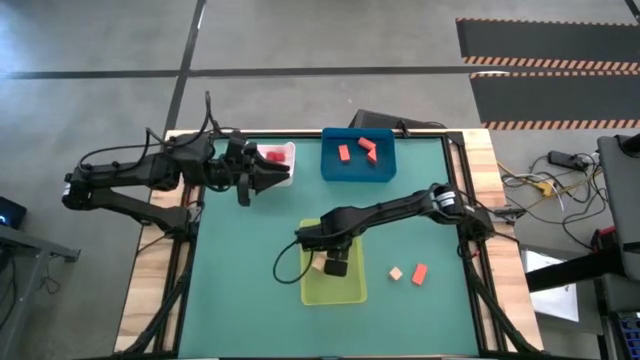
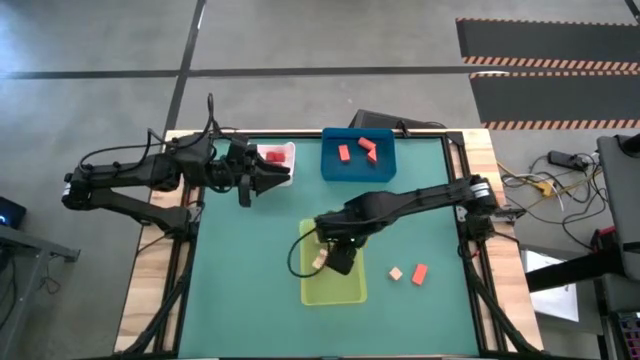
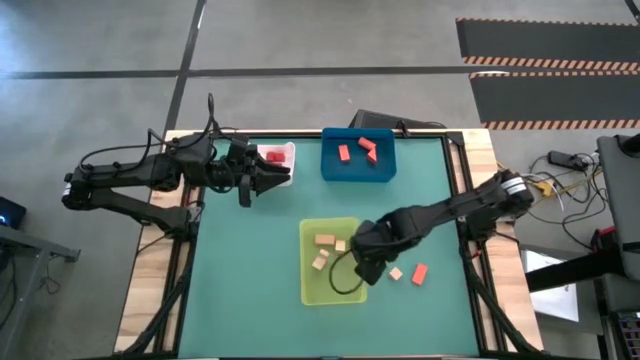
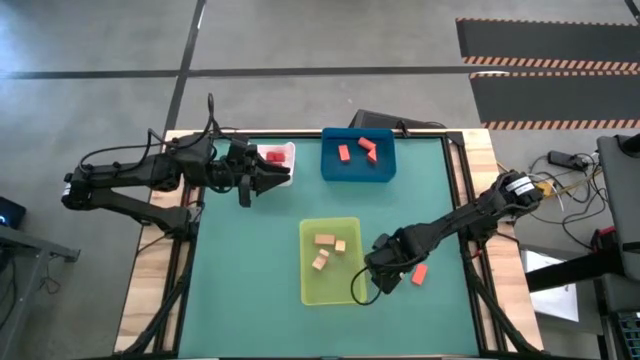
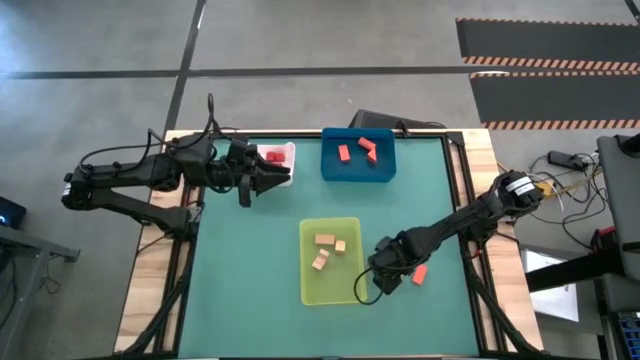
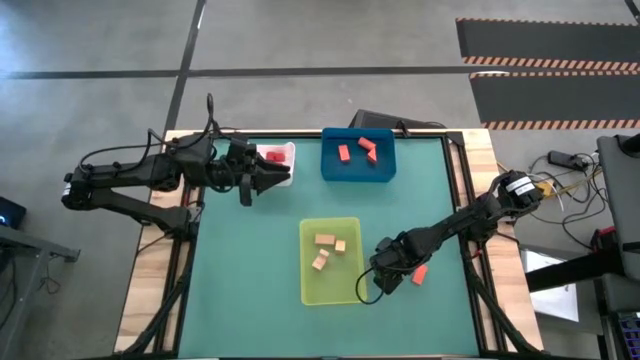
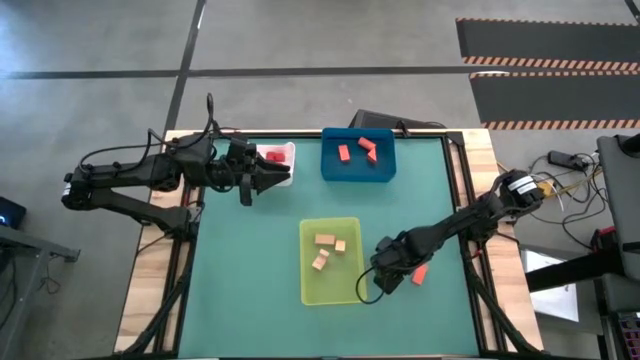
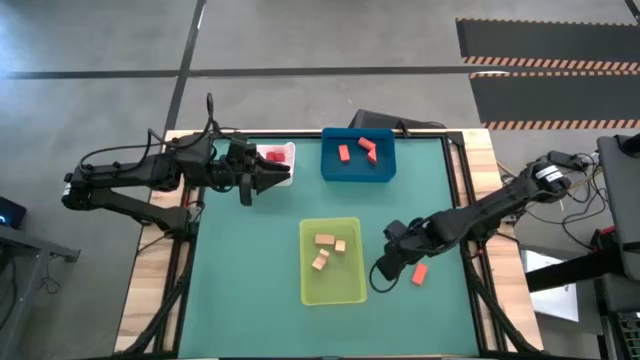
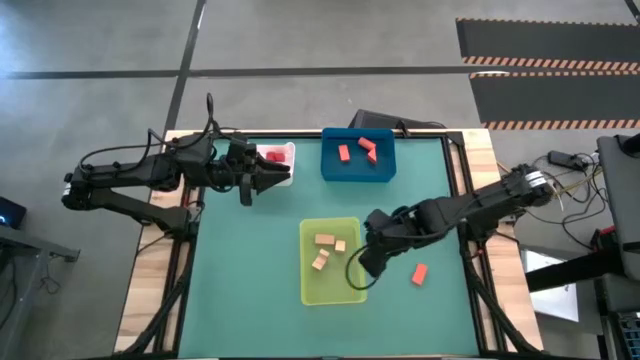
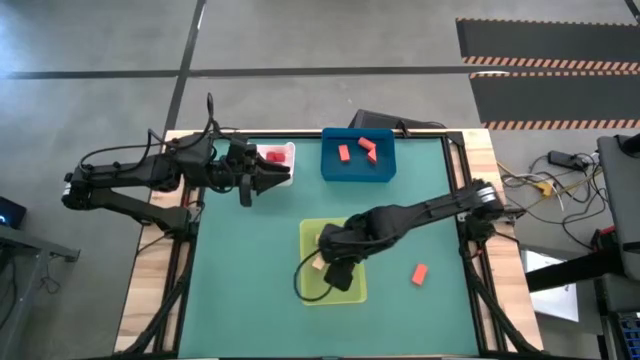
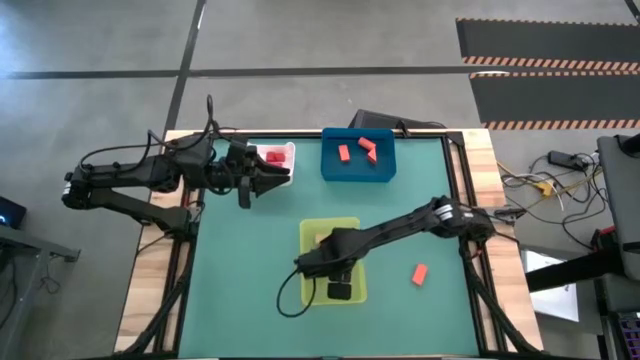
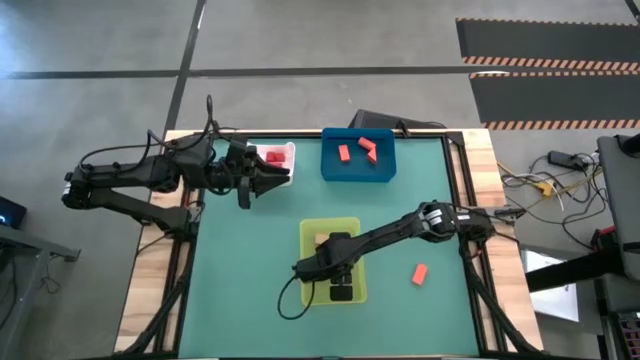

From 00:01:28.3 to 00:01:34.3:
Task: Sort & place blocks by color
Put the light orange cube block into the yellow bin

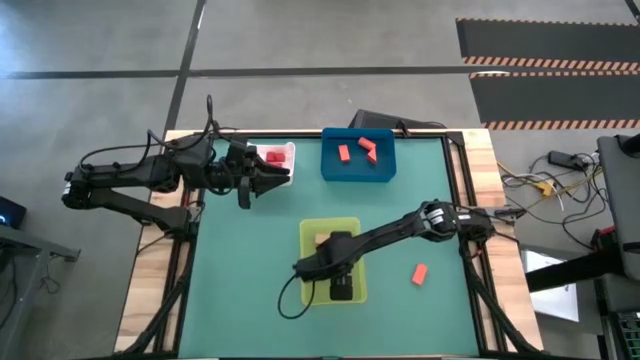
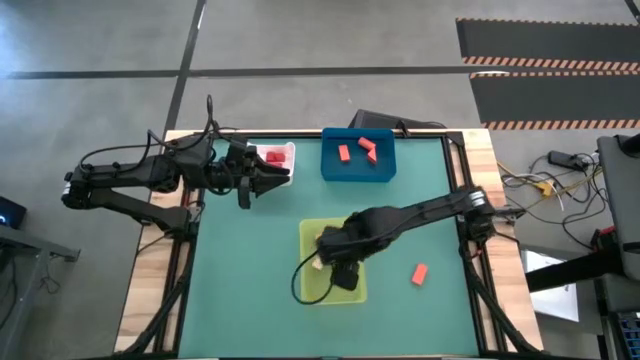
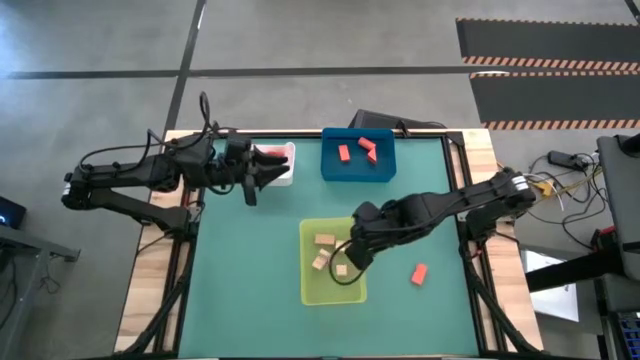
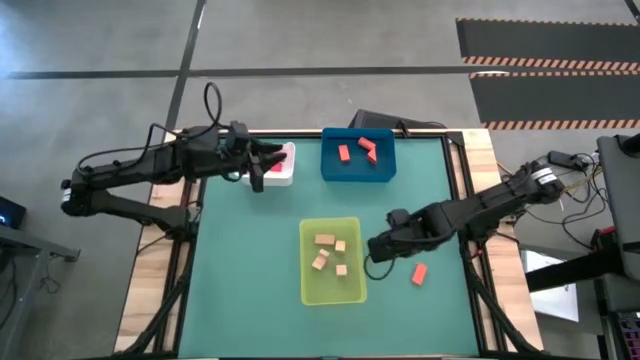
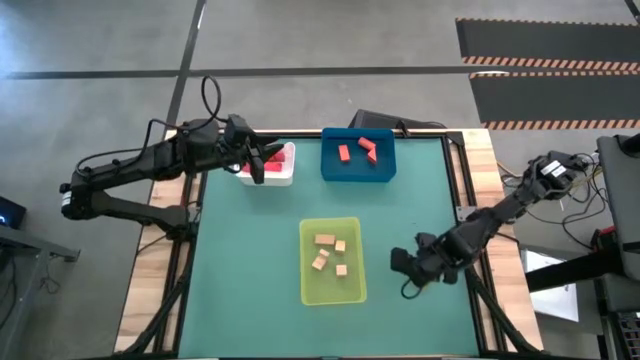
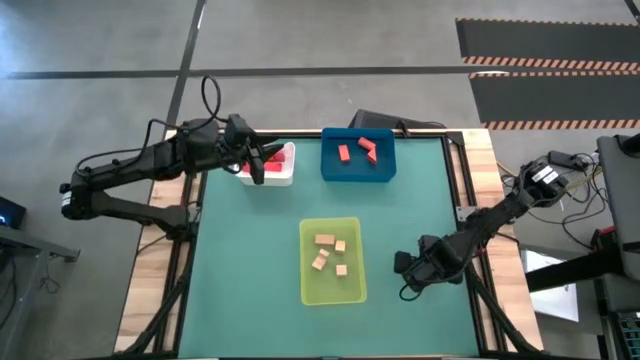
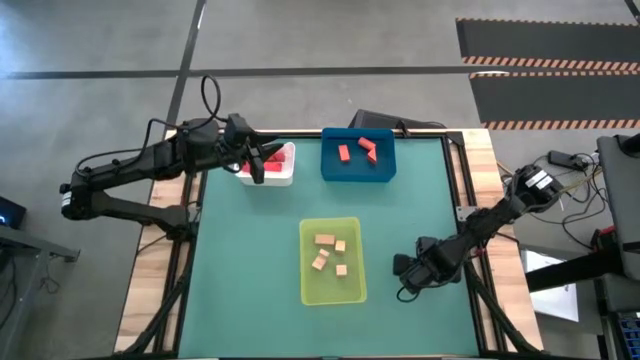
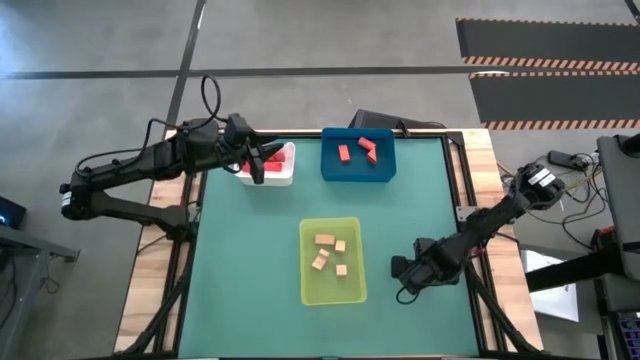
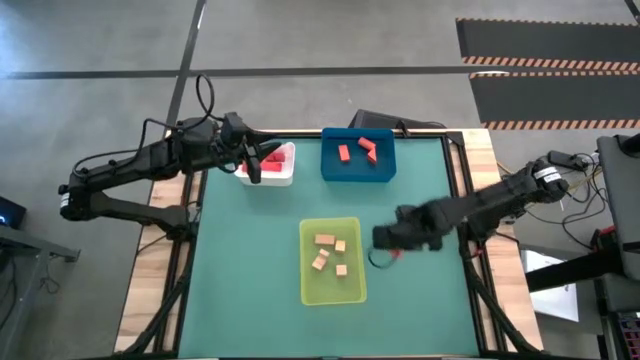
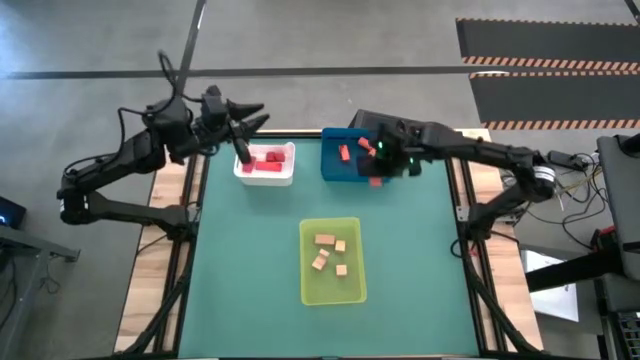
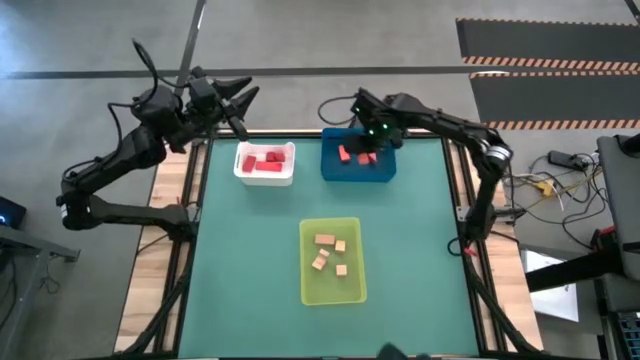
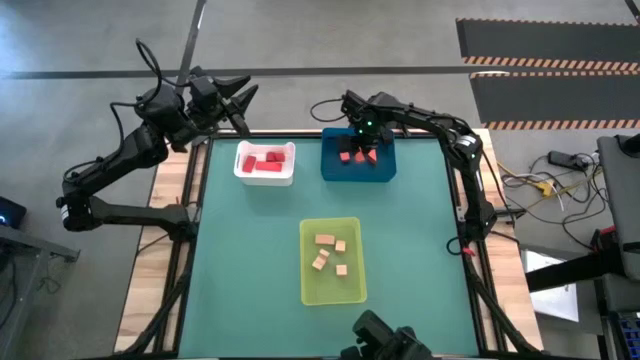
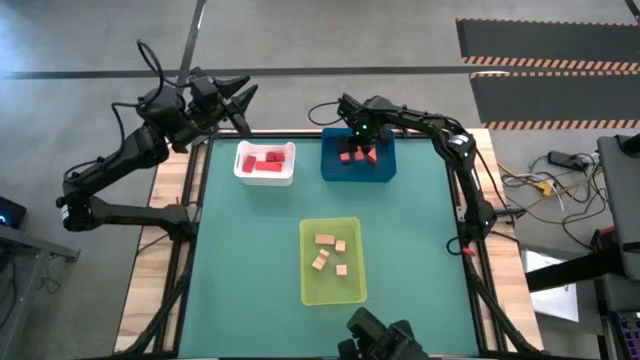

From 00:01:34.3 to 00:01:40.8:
Put the orange rectangular block into the blue bin

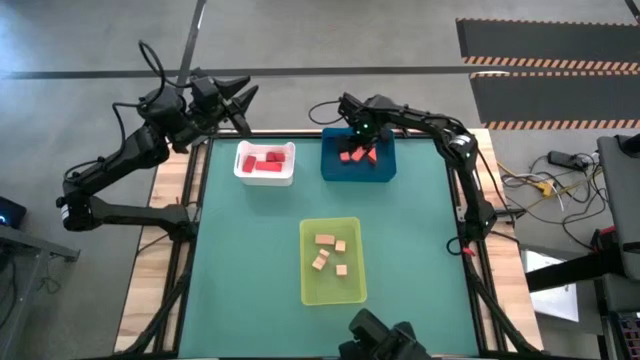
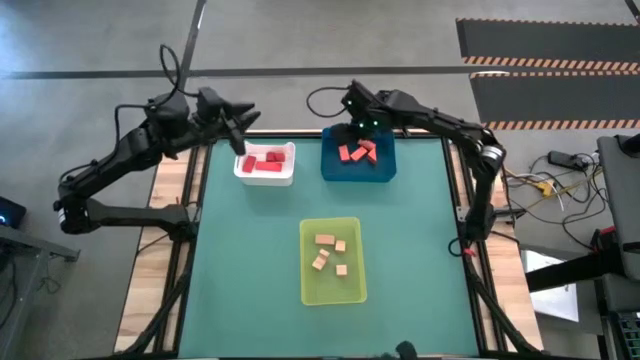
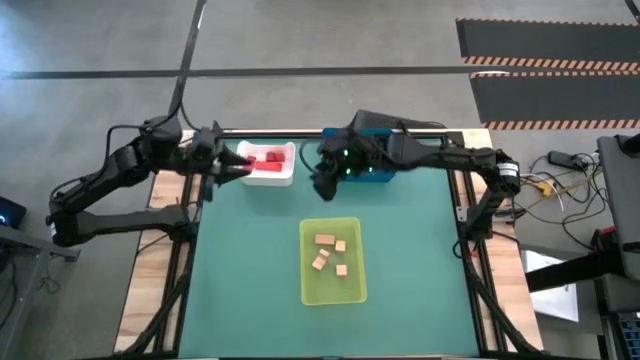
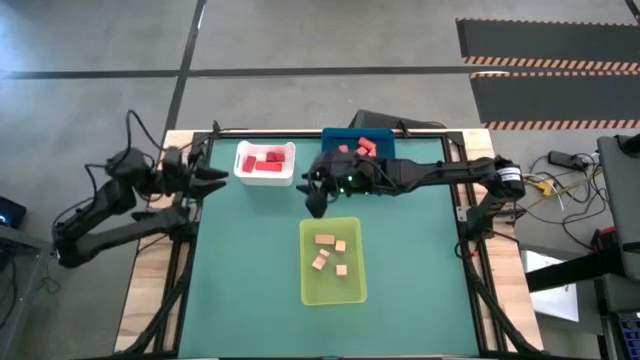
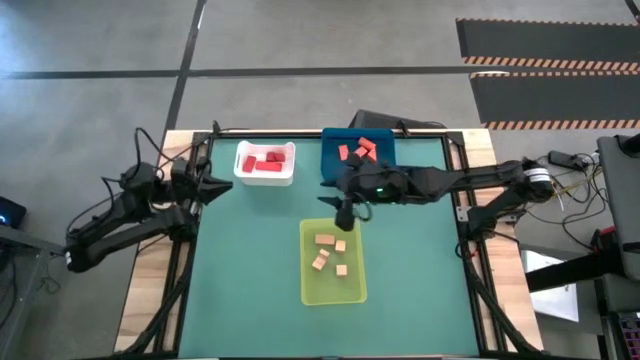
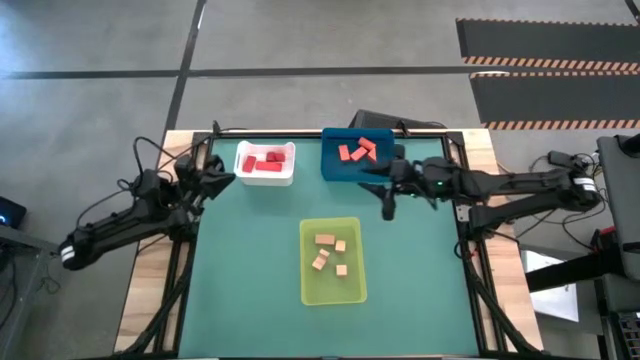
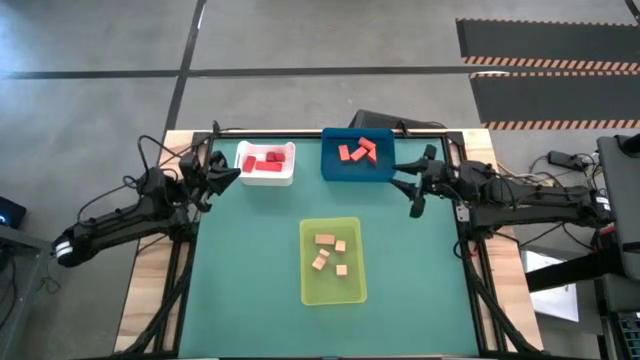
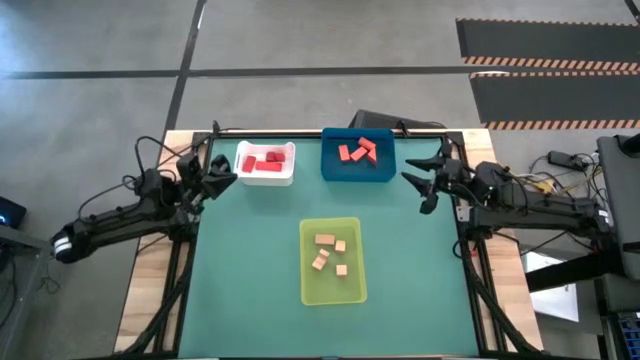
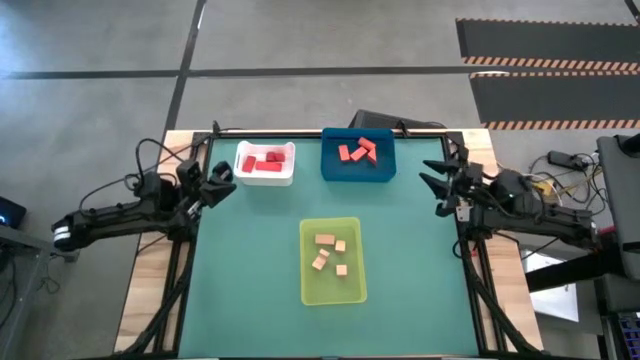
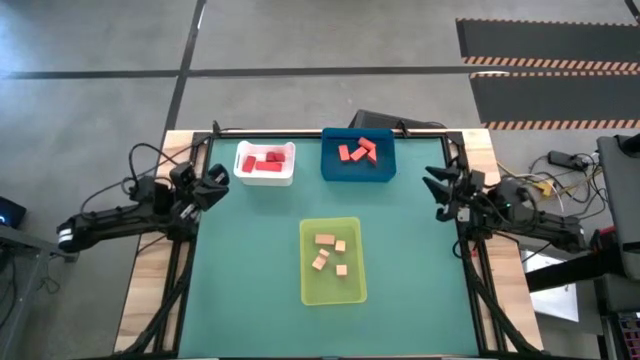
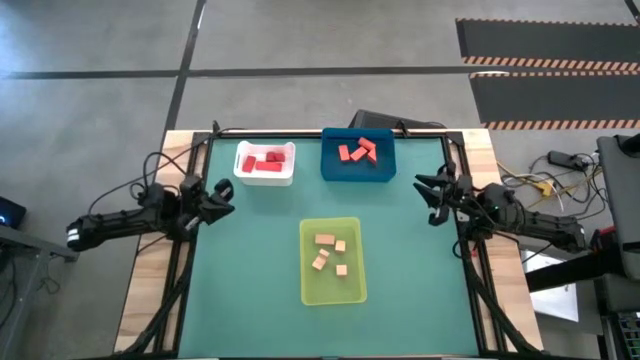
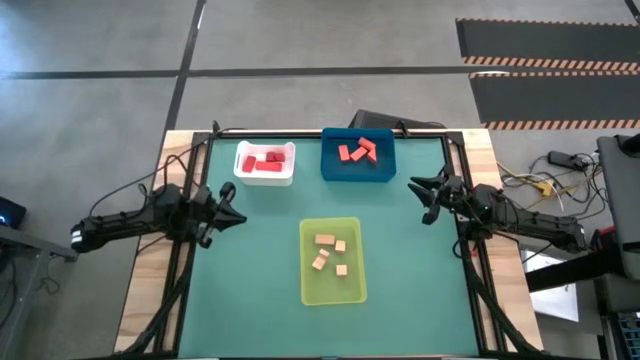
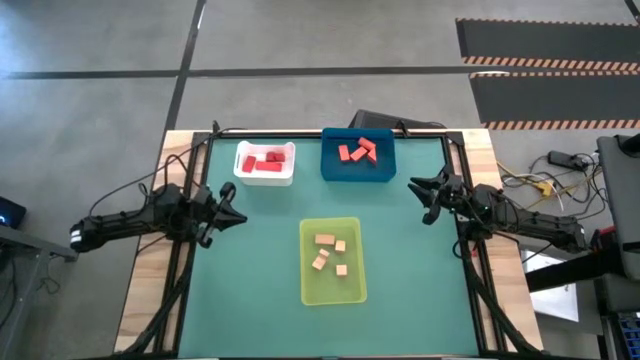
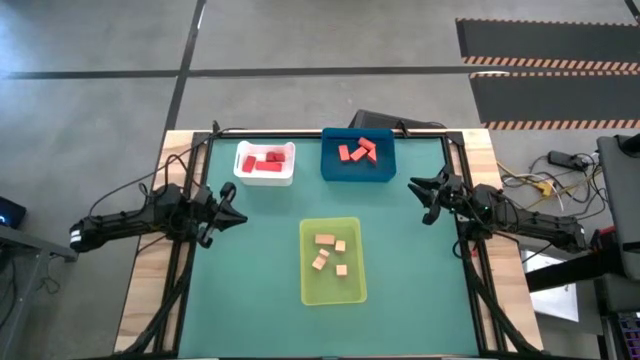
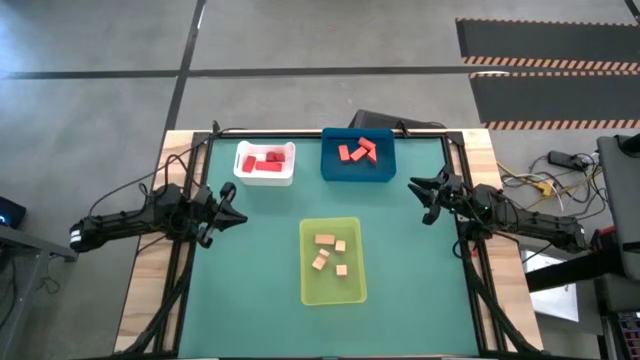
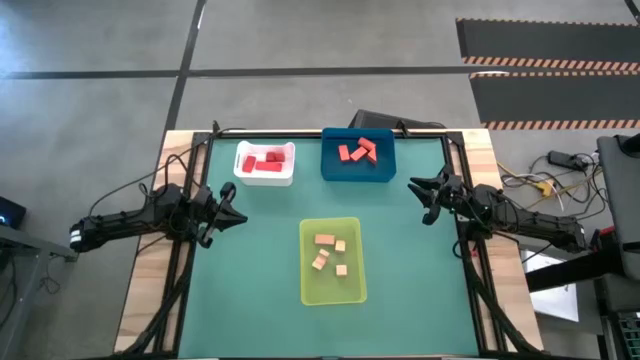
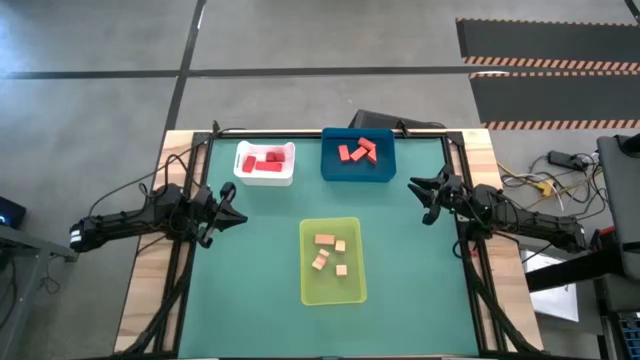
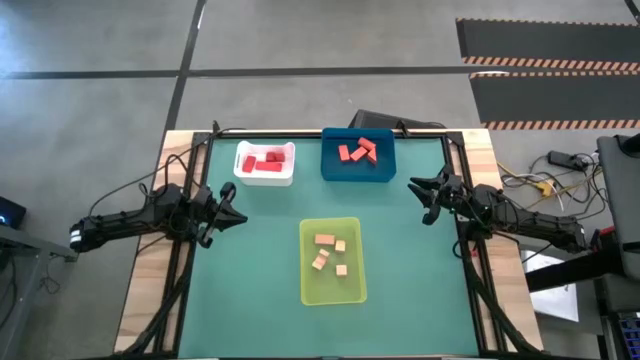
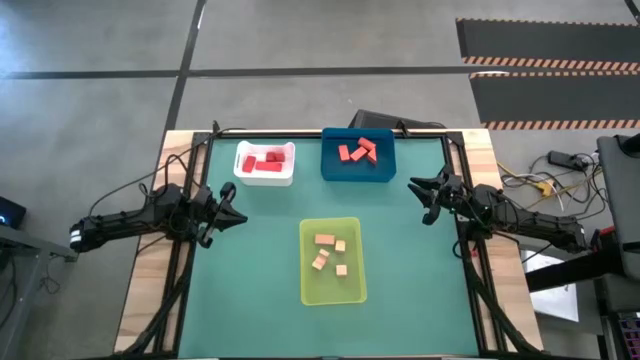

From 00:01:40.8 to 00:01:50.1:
Return to Home Position
